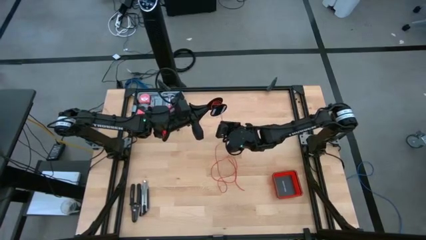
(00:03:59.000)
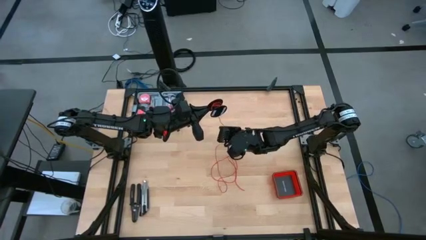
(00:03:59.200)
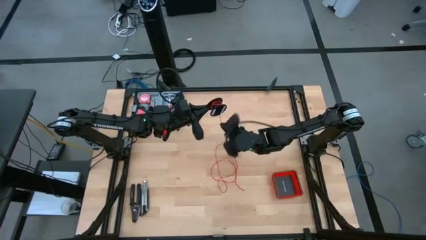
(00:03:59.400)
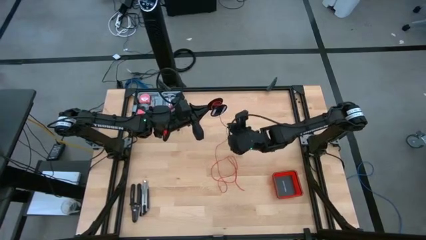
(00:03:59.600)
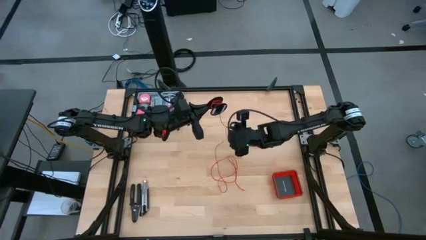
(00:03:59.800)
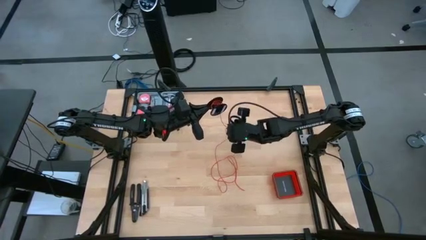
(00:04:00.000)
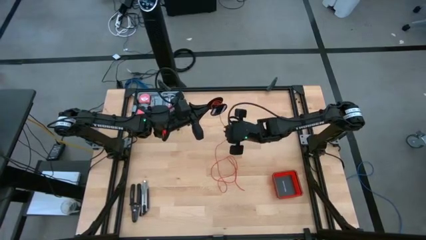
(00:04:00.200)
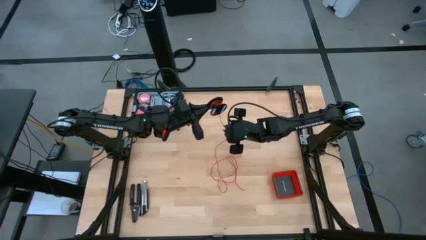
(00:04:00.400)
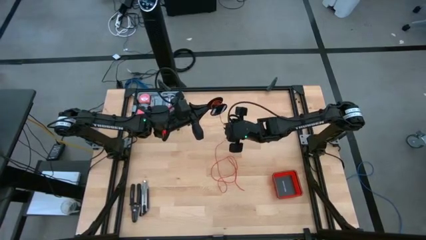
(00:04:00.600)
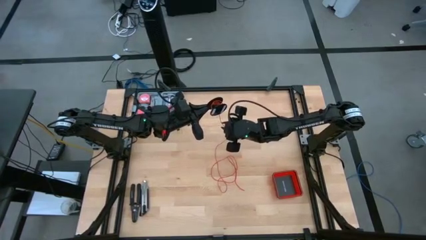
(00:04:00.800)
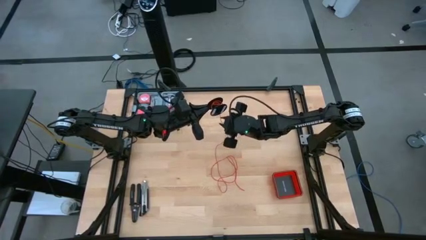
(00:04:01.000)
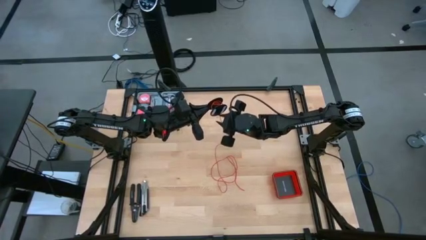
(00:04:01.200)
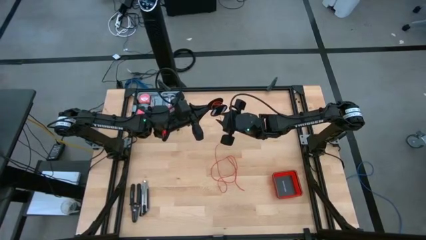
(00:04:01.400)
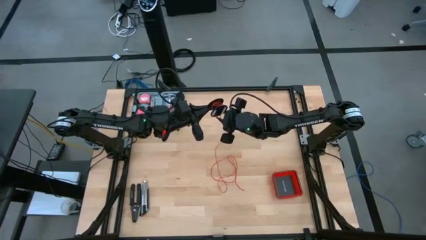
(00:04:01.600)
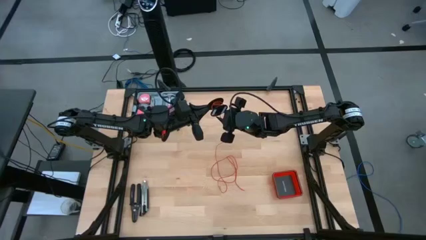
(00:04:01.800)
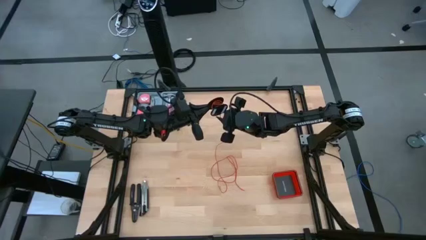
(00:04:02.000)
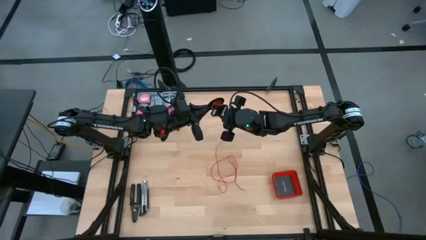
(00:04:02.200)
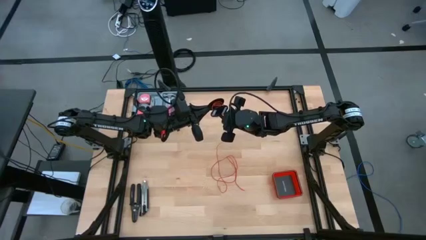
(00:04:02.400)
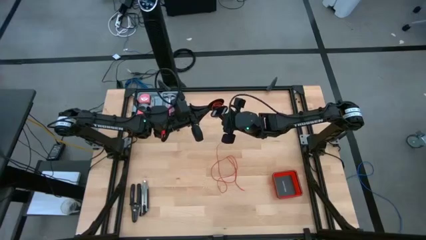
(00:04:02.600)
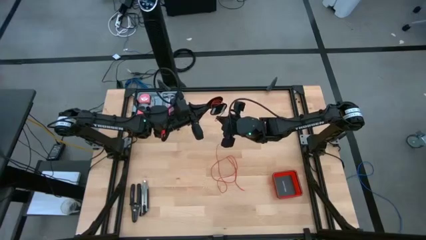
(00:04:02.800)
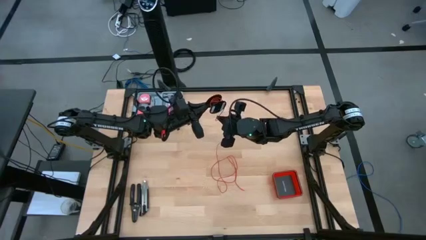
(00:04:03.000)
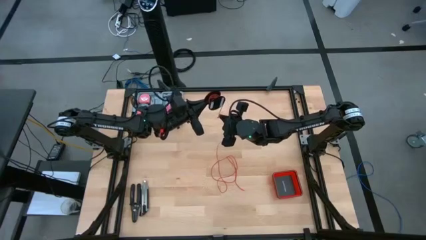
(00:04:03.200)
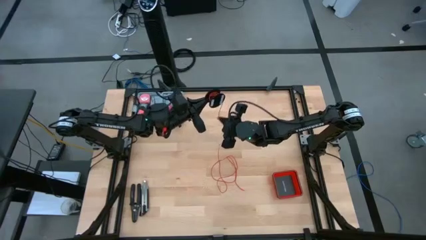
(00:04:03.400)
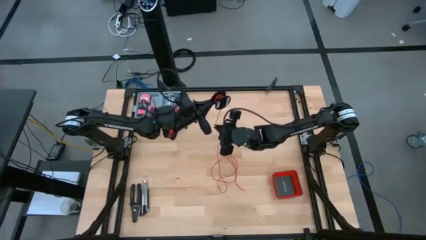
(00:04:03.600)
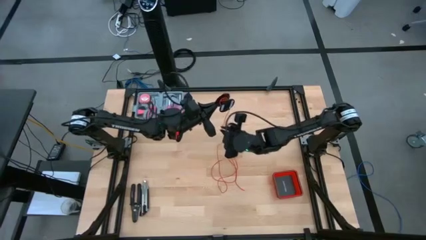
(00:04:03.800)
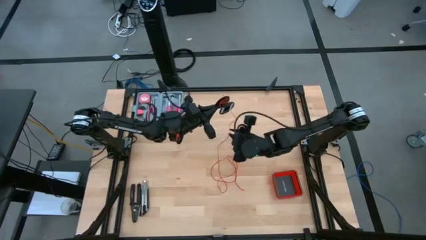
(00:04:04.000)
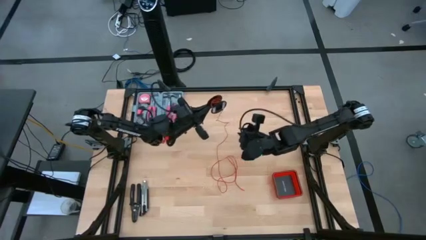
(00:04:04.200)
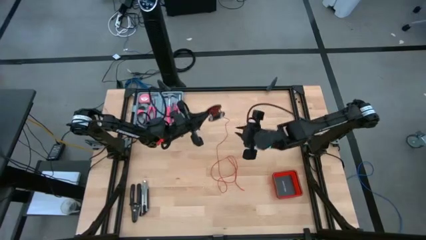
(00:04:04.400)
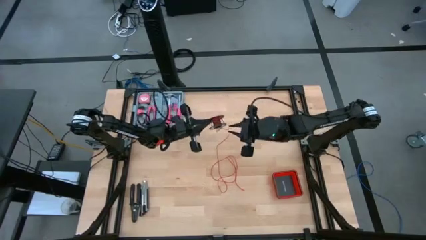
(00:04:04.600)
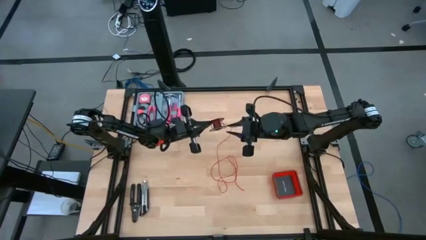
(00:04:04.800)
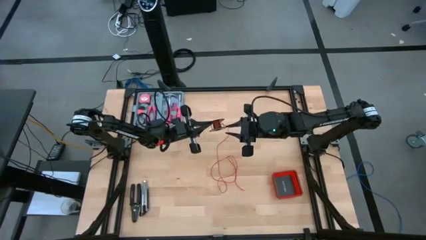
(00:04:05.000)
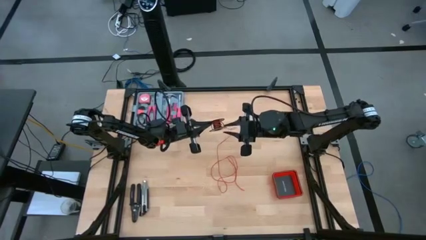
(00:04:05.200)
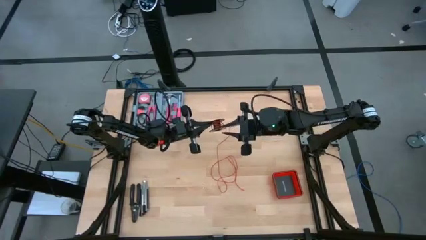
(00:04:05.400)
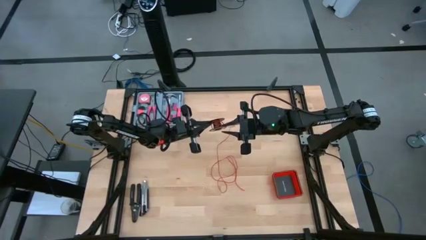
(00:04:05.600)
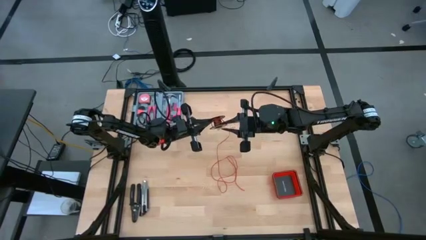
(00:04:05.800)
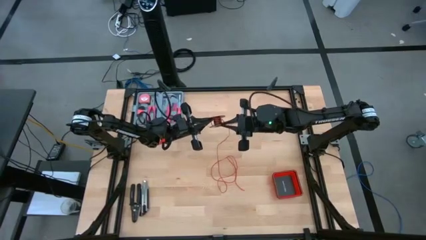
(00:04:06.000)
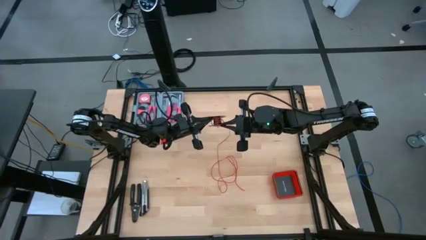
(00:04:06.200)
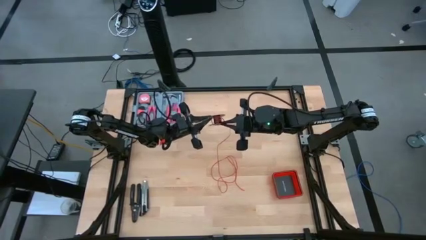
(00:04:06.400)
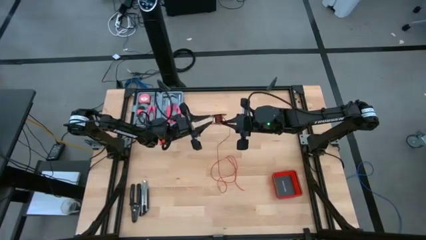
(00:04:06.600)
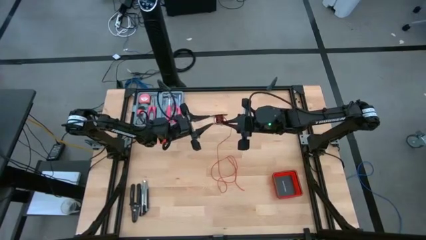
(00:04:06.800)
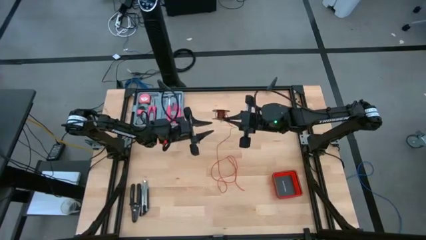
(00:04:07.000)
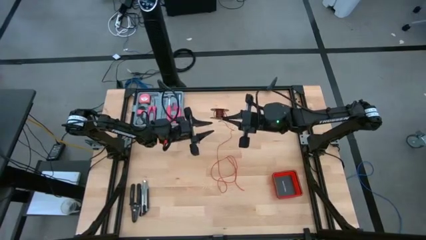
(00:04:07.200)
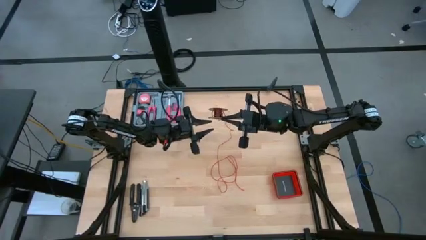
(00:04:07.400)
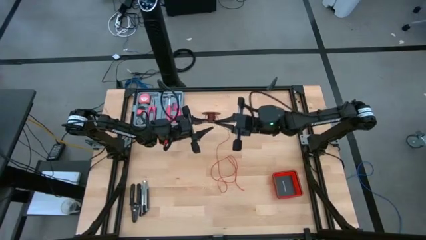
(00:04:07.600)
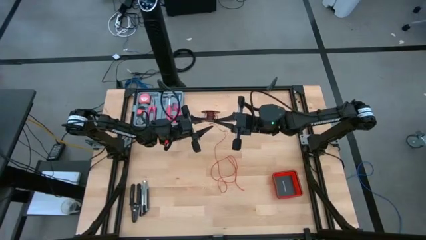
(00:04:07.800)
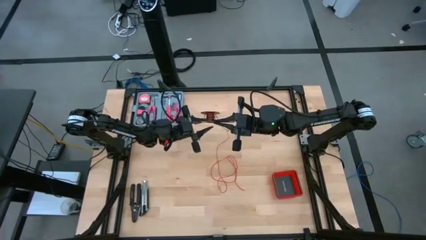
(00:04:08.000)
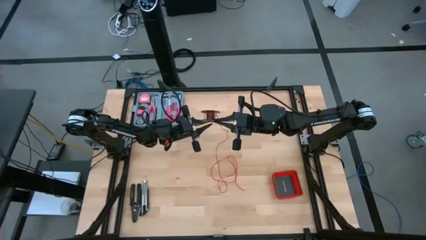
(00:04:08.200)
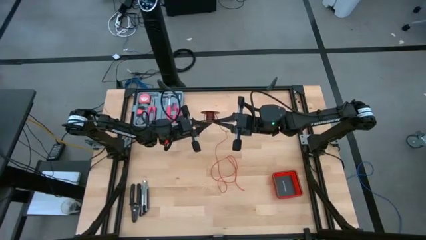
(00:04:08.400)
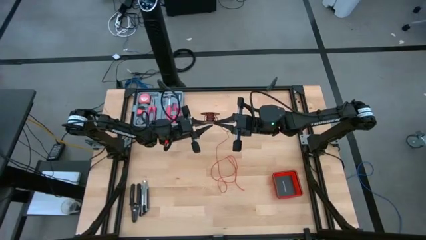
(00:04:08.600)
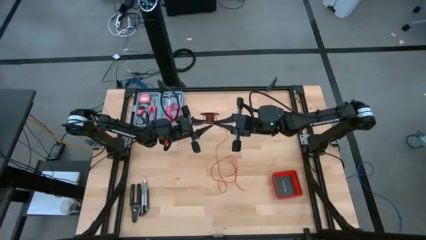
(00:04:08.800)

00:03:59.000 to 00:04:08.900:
Task: Coil cords
Coil the red wire onto the spool

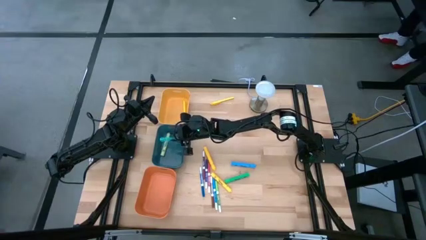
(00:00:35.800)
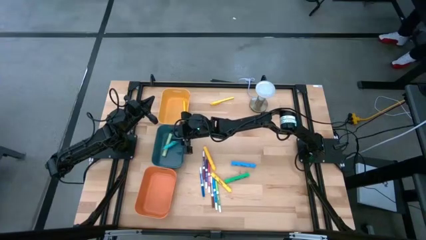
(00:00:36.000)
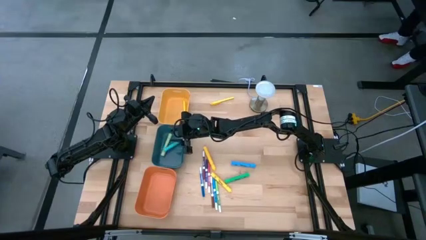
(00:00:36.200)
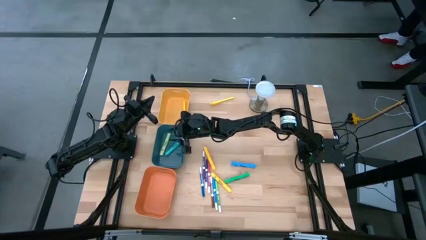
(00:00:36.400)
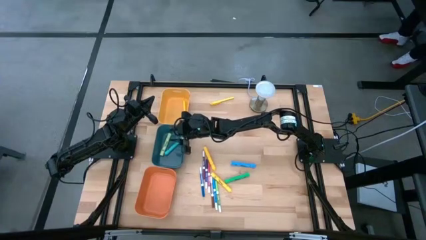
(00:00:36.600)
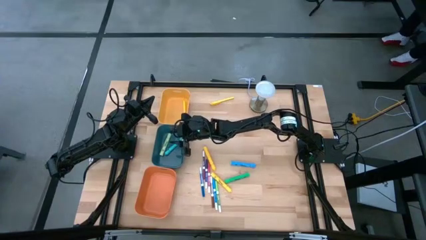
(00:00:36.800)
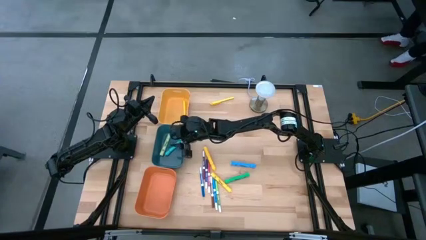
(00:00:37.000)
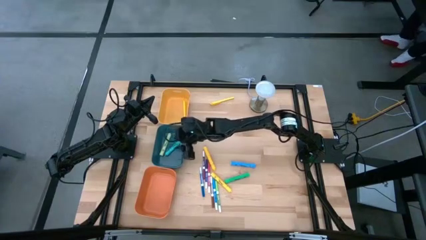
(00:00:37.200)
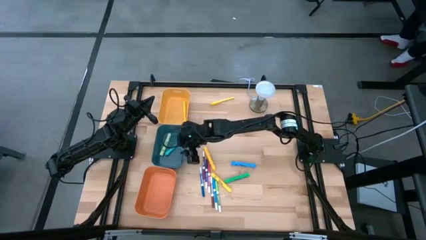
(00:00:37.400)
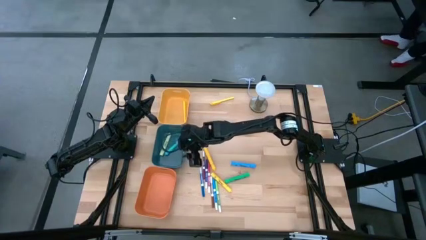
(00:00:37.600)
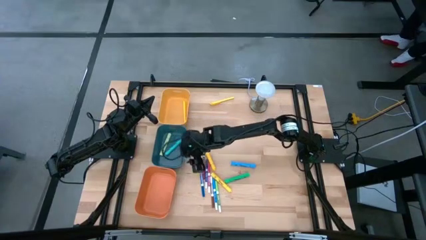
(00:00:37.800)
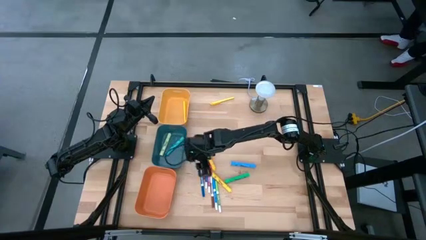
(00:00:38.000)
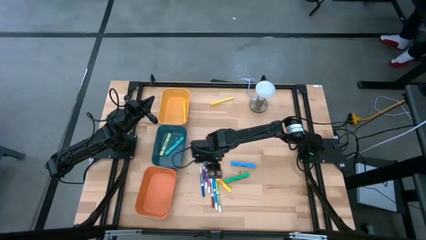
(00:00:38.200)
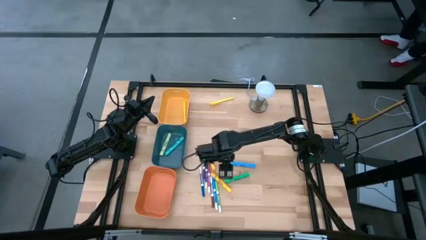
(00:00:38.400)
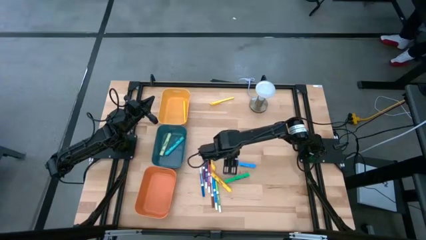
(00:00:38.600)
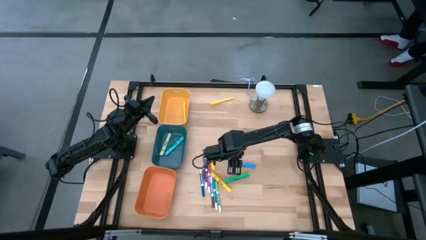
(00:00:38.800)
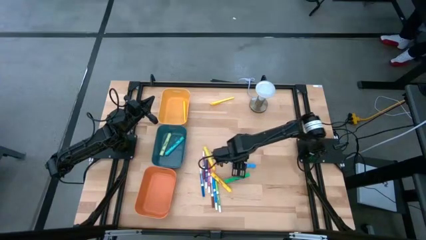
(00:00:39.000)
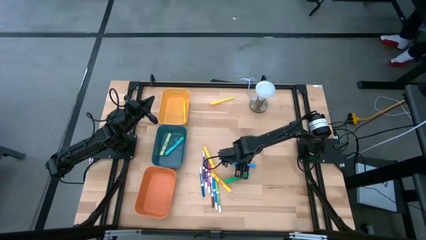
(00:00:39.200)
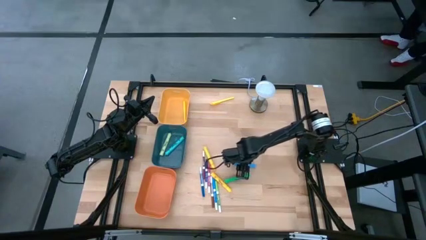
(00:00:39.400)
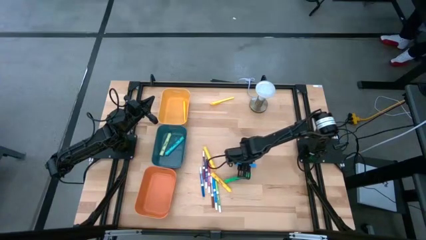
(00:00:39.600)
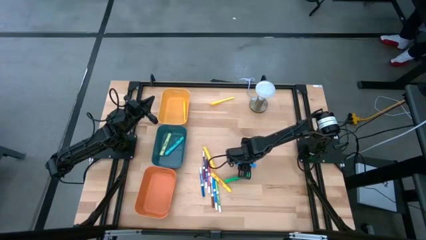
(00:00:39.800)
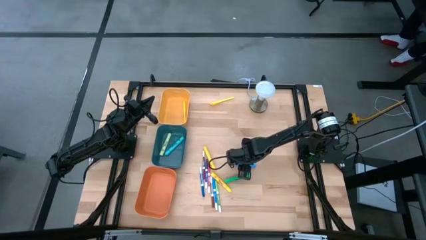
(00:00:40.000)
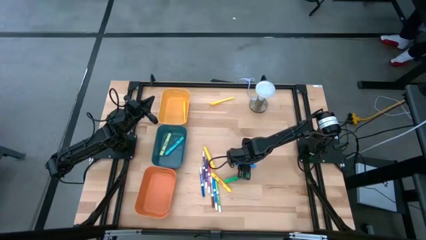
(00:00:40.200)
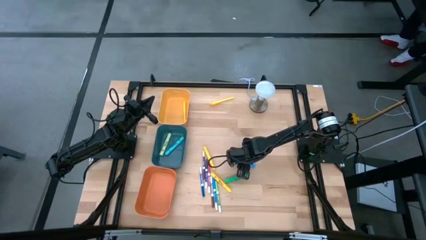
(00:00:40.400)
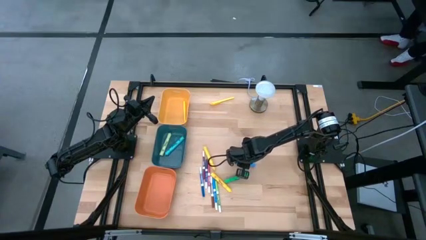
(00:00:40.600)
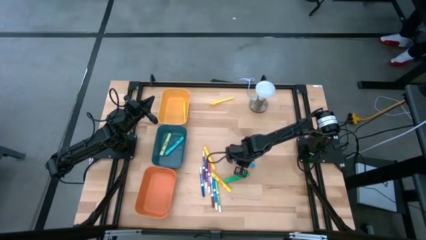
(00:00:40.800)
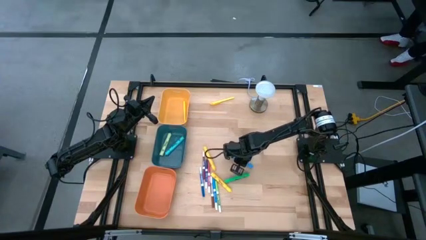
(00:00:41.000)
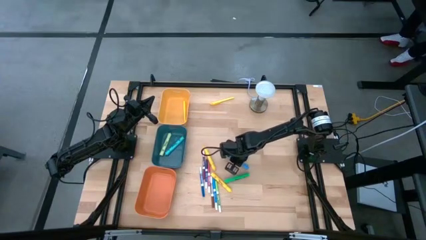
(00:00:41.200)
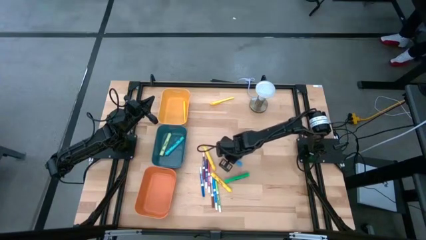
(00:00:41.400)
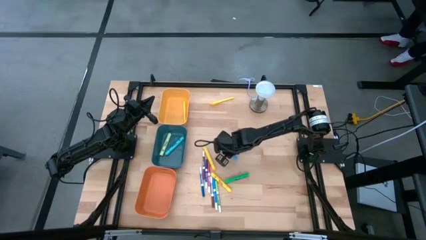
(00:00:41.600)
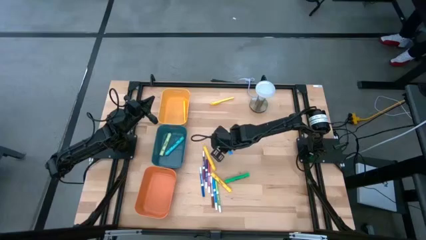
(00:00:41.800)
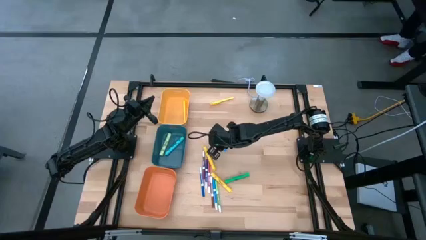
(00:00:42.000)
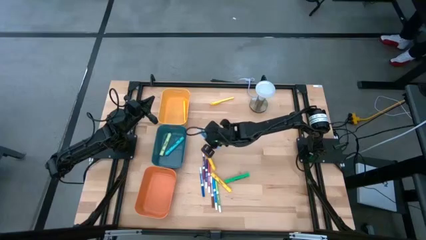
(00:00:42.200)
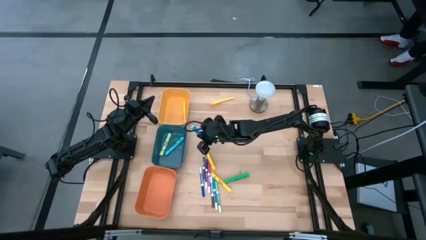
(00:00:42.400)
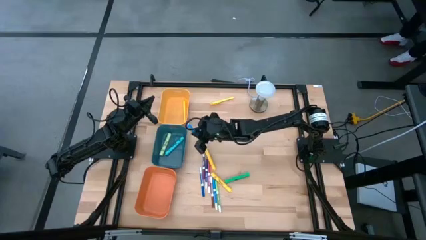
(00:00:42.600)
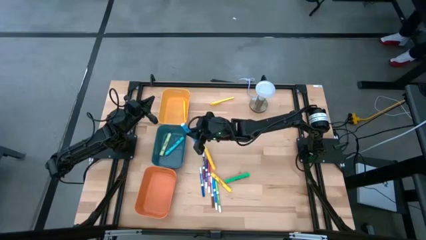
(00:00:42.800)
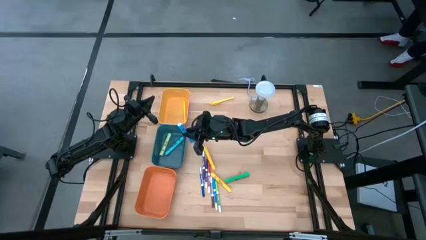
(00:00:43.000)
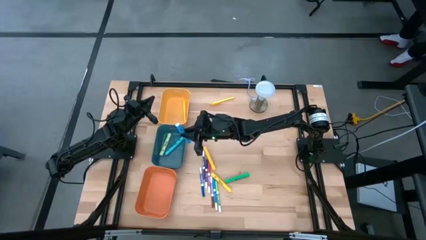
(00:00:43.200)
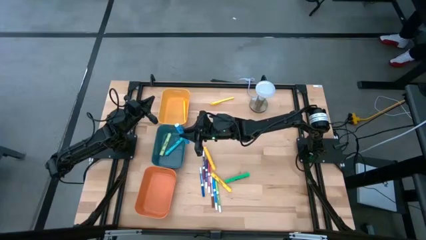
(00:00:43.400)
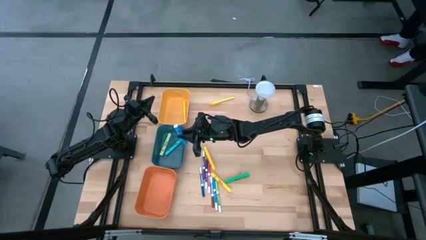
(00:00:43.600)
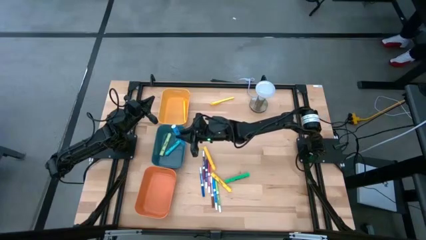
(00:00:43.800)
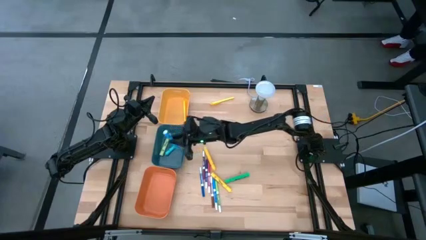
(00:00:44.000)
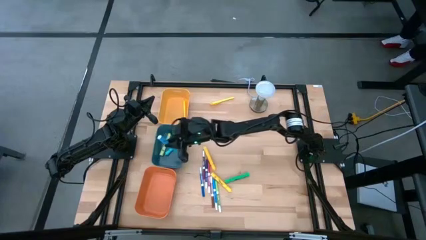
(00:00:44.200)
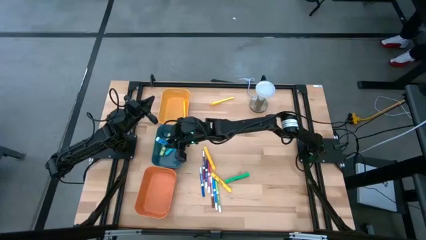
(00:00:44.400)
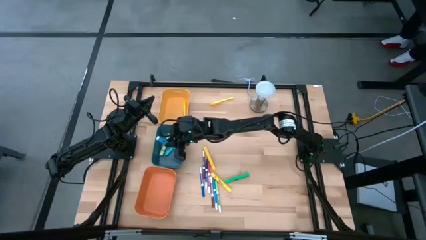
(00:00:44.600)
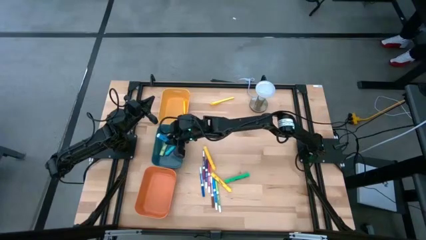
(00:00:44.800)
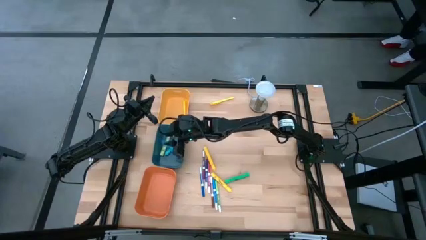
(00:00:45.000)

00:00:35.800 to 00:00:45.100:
Task: Pick & Place Markers
Put the blue highlighter pen into the blue bin
